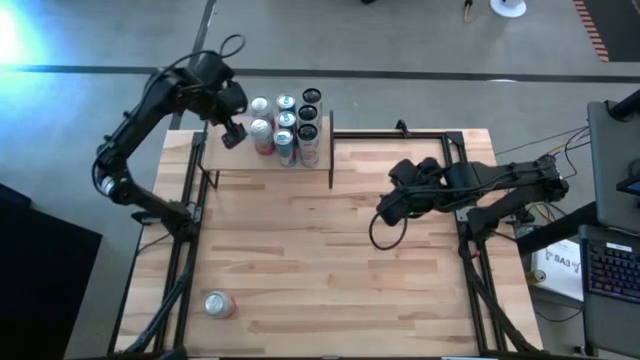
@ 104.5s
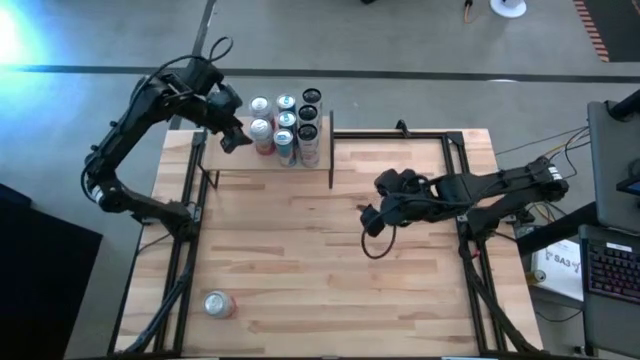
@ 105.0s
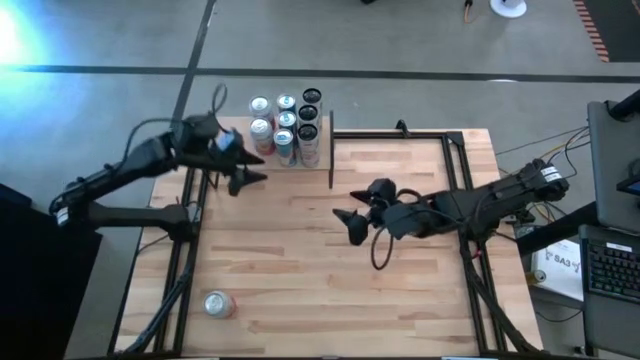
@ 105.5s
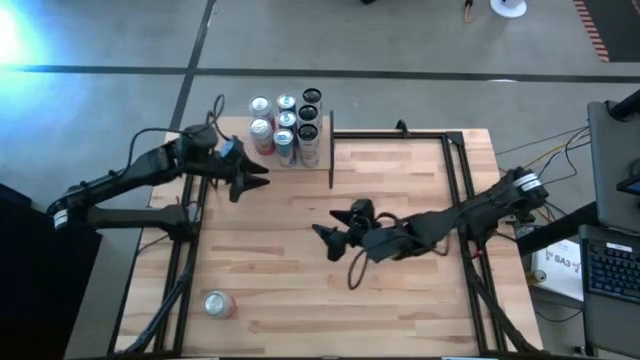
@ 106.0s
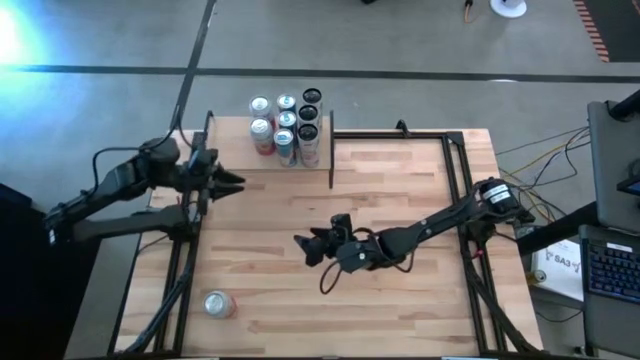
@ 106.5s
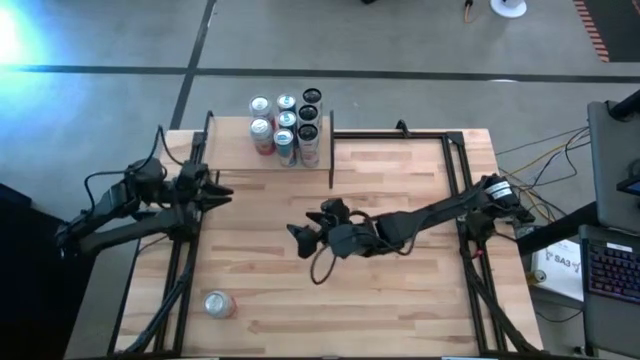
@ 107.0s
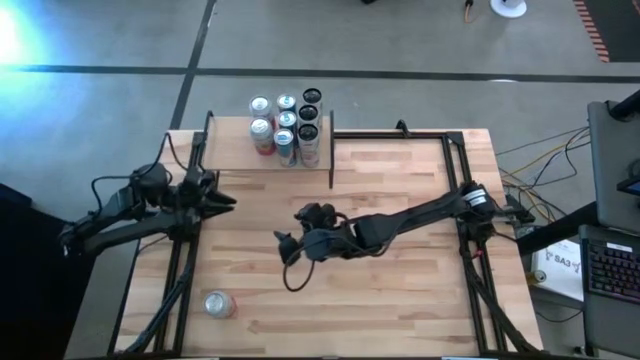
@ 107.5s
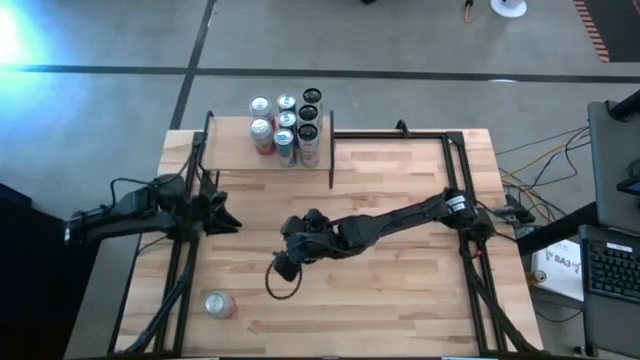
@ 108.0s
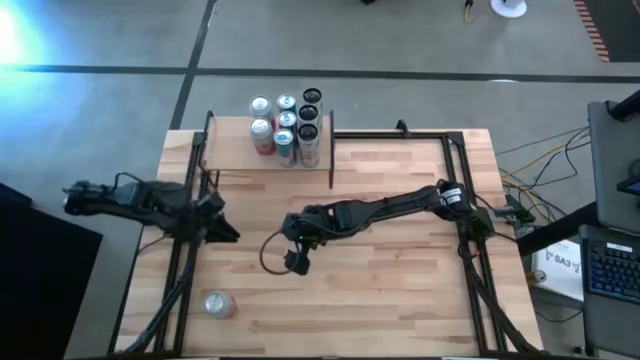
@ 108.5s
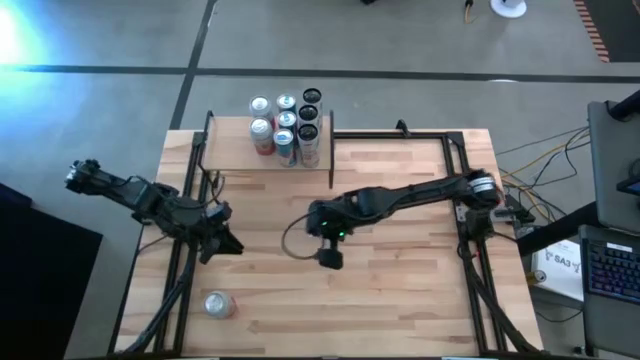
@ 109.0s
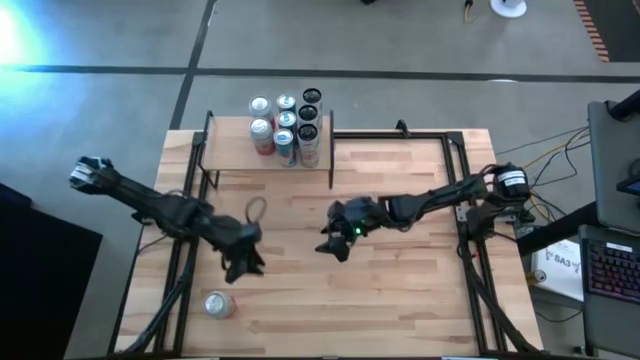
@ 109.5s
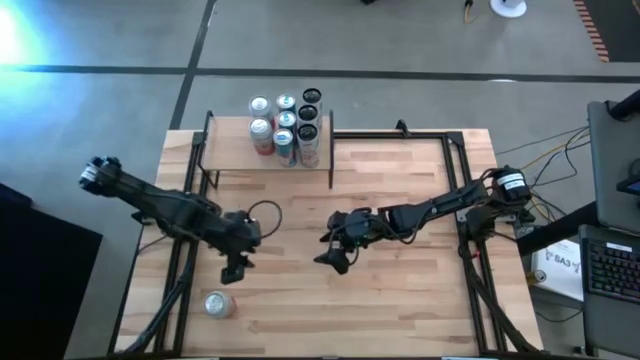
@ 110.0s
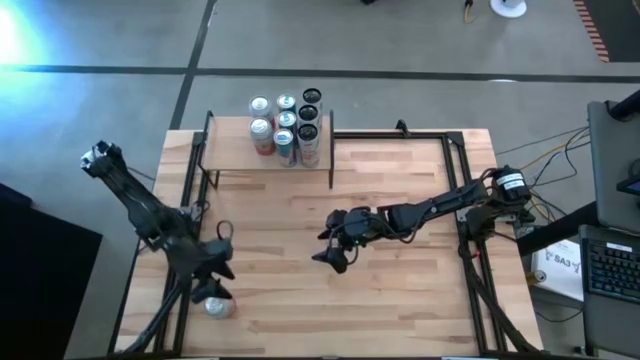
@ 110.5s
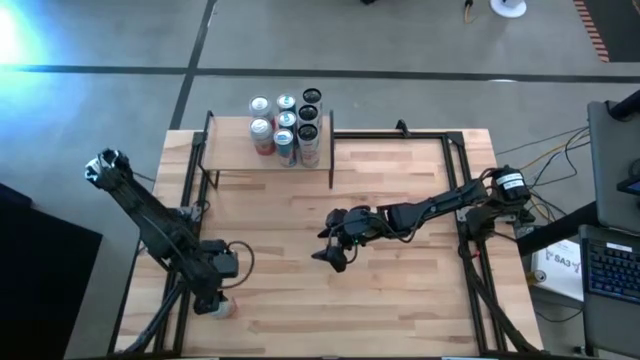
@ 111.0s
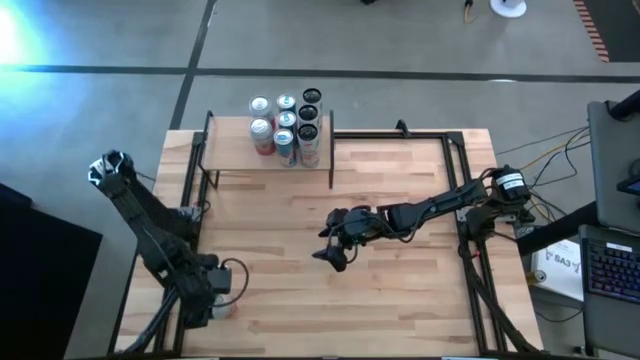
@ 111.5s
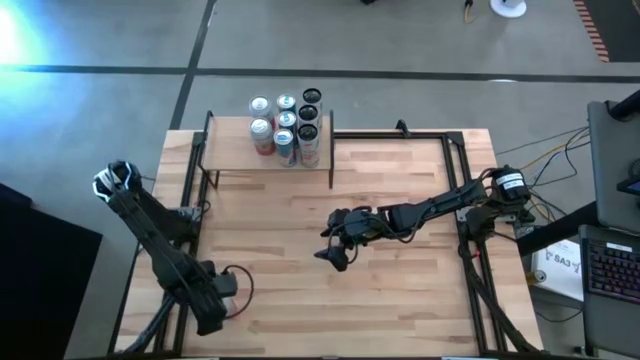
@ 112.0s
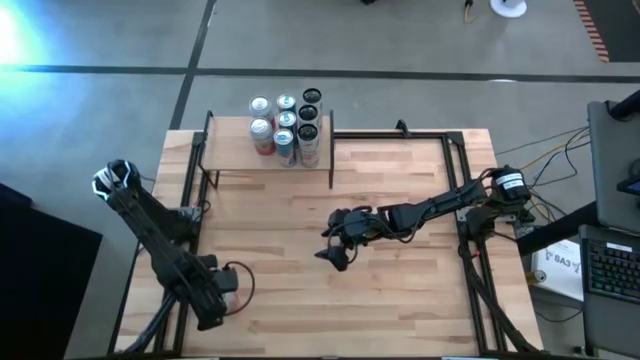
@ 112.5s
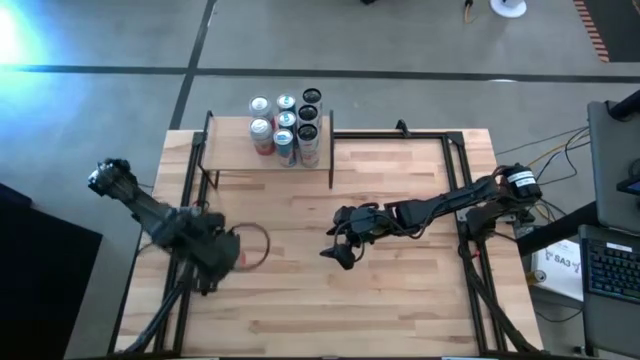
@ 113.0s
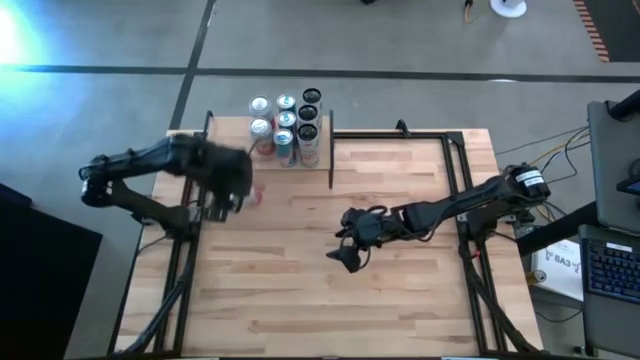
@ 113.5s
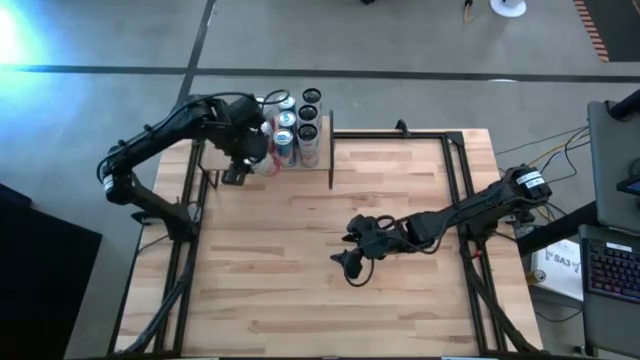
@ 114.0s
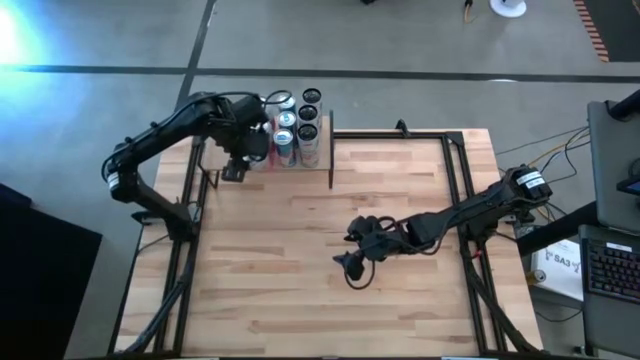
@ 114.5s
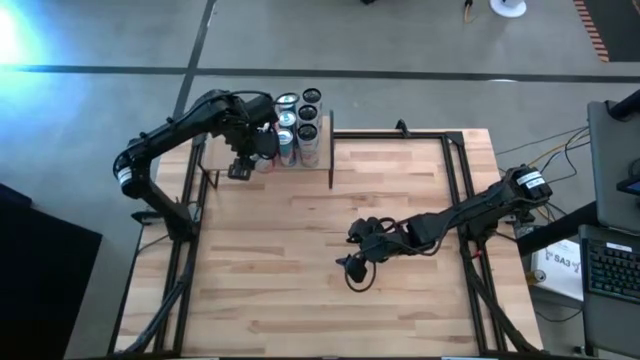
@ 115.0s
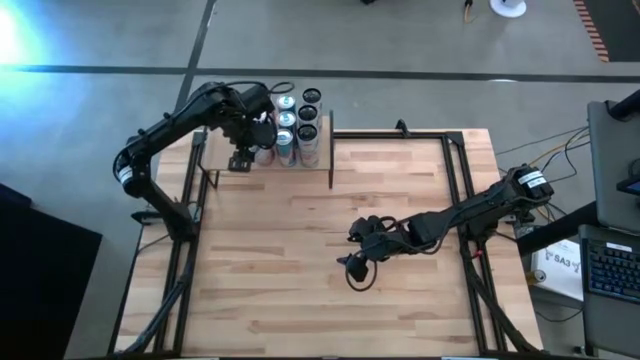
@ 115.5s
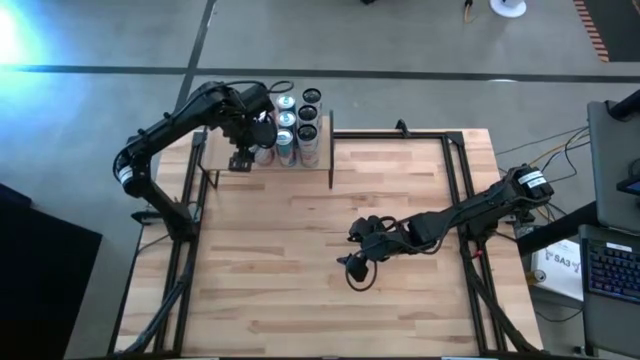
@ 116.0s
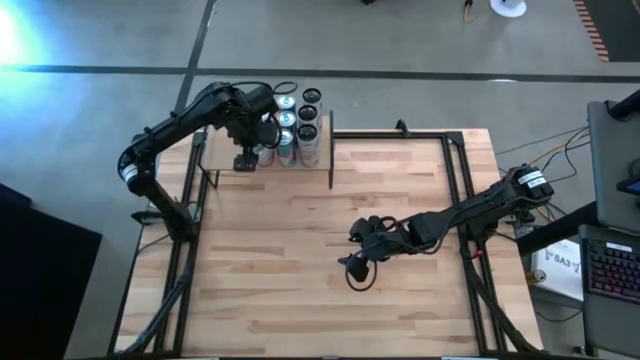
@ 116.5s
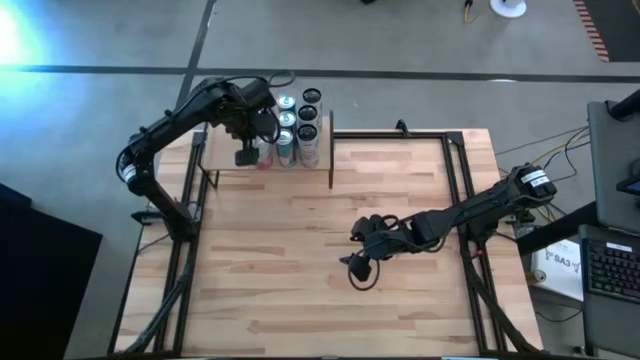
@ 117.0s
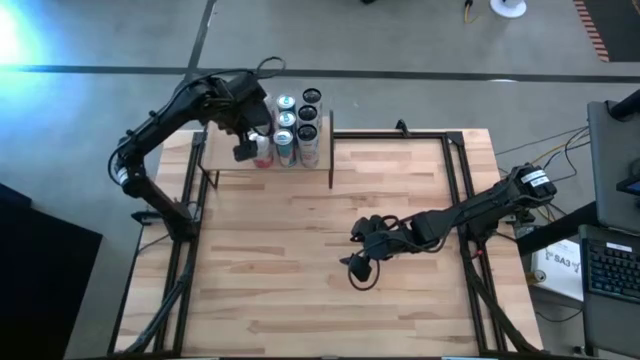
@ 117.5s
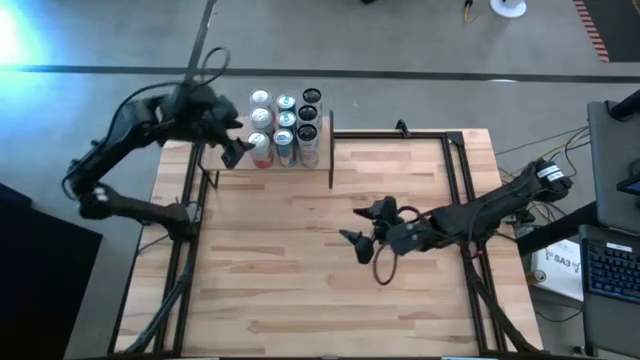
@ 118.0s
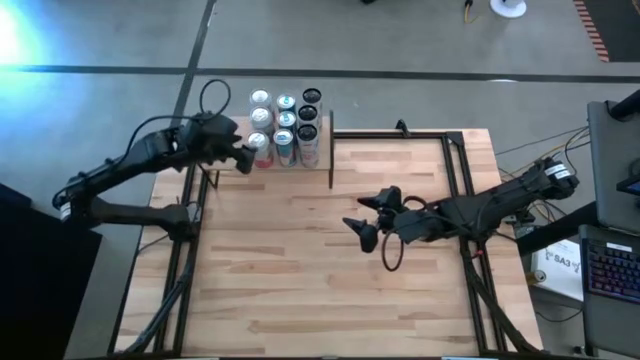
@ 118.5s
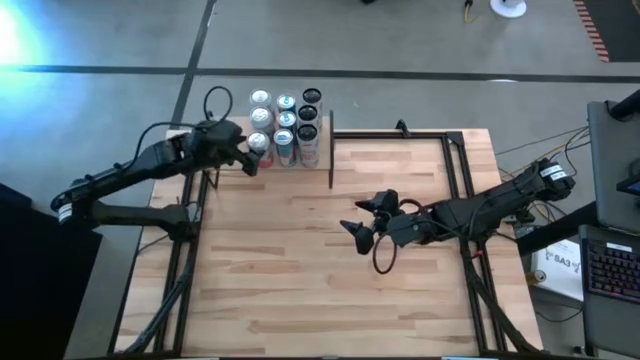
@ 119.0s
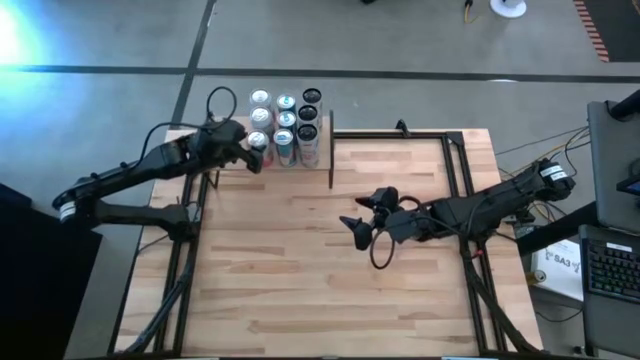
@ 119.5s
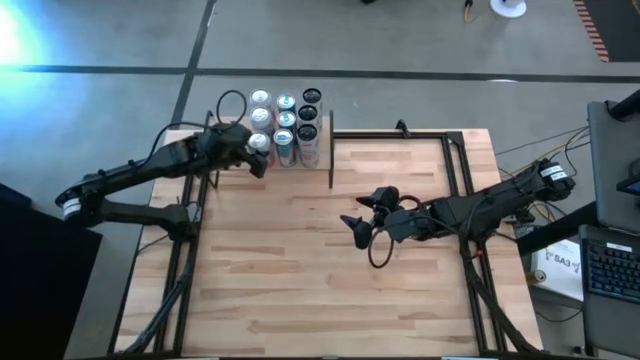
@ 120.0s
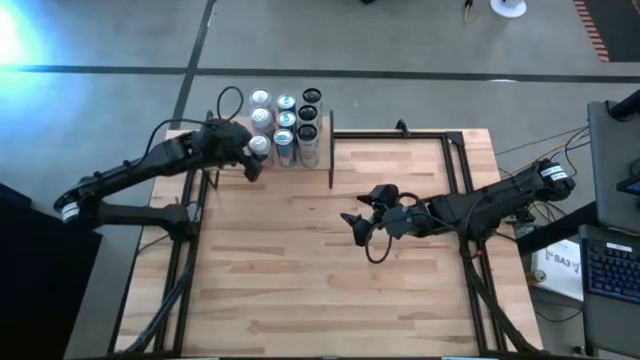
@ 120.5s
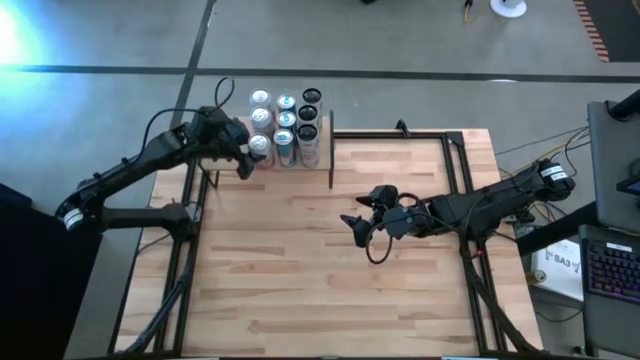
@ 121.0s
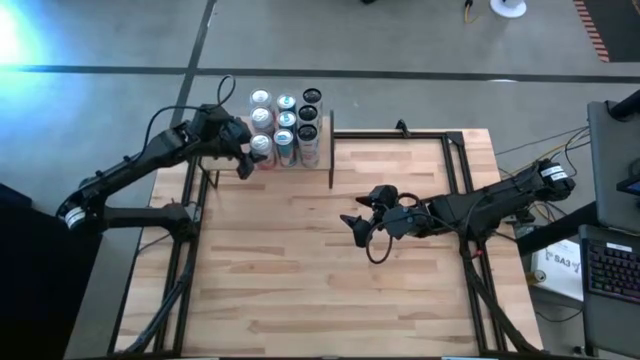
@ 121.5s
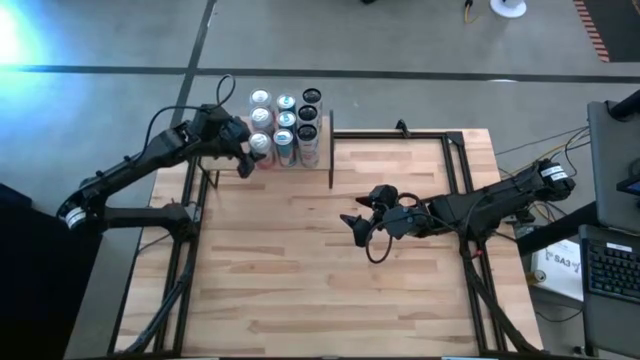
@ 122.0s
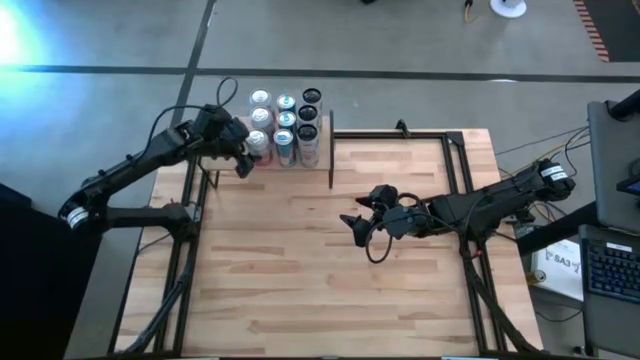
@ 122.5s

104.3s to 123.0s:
Task: Place canned beverage on shelf
Put the pink-white soda can on the shelf aligned with the other pink-white soda cans

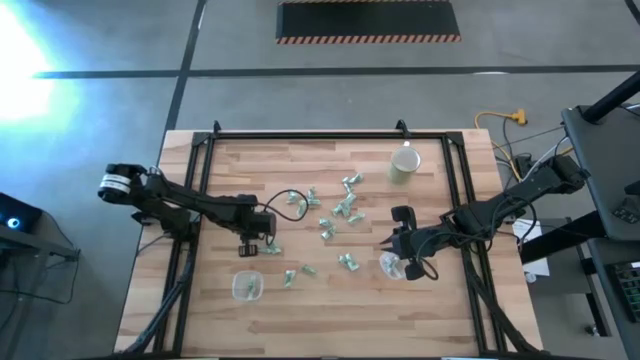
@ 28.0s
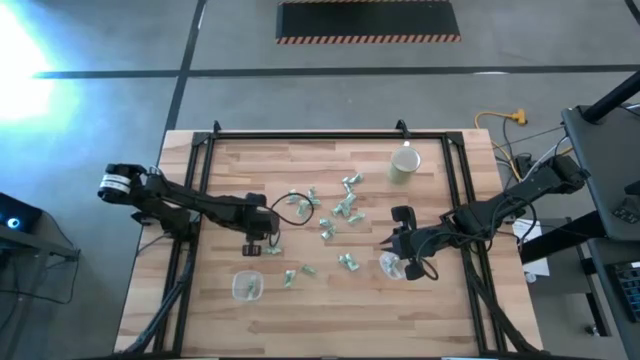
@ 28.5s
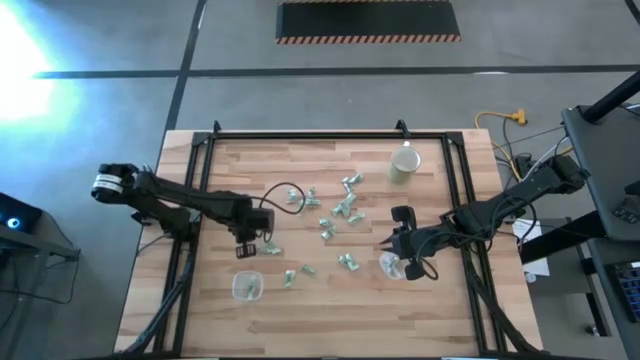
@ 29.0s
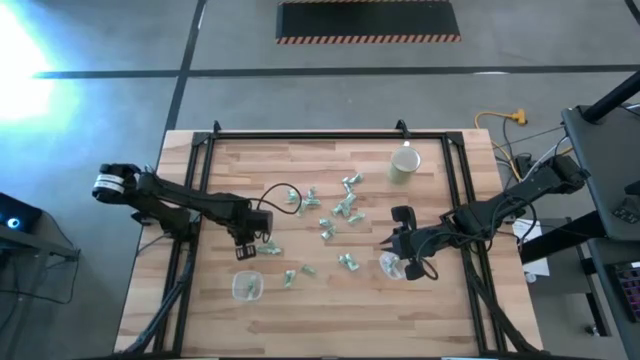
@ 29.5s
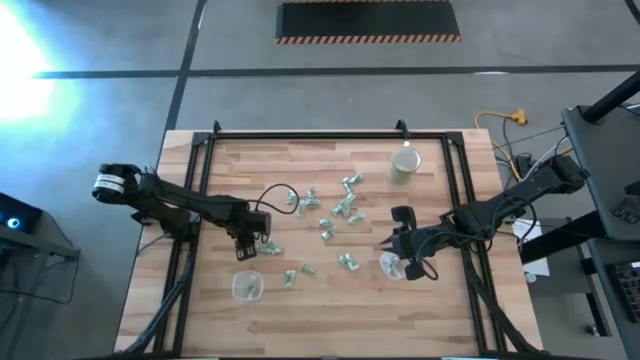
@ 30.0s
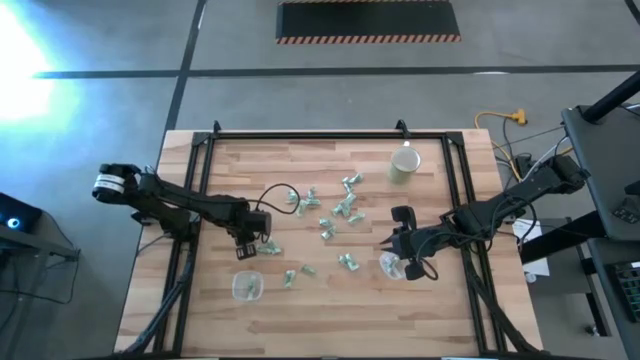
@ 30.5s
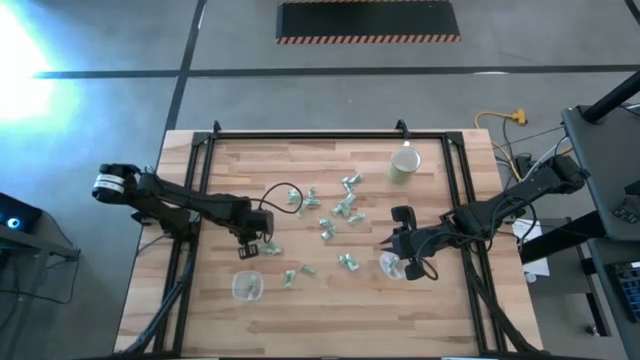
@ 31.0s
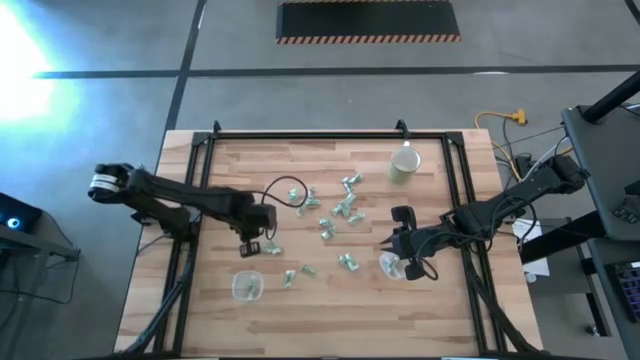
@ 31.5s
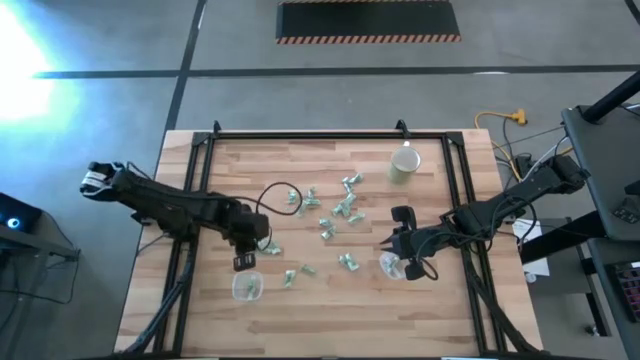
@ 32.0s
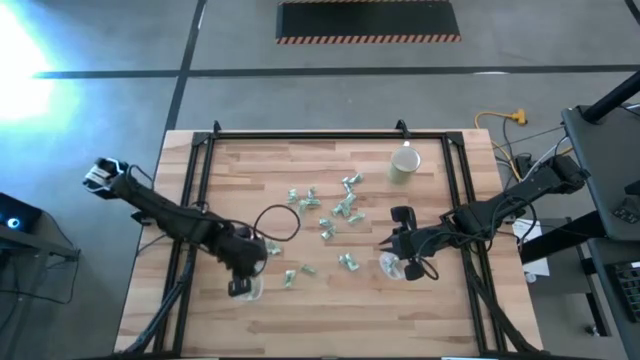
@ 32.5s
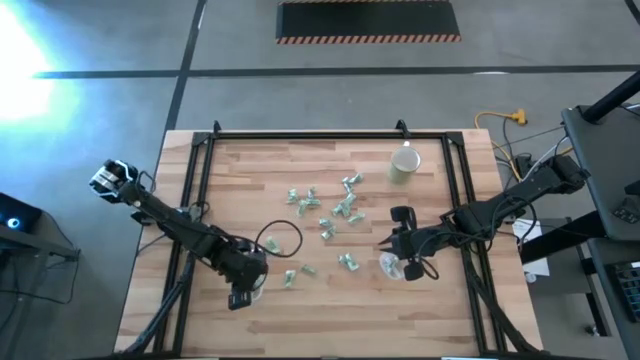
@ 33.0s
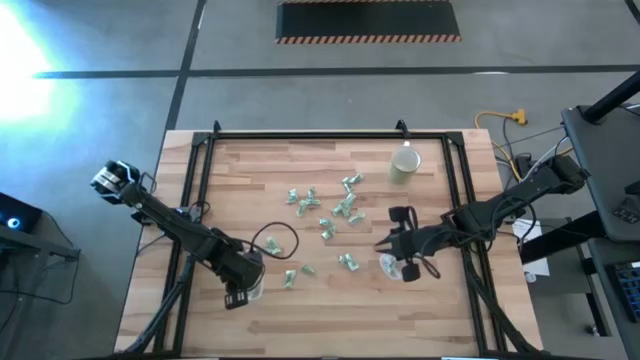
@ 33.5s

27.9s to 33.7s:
Task: Pick and place Stevia / Truvia into bins
Put the stevia packet into the left transparent container
